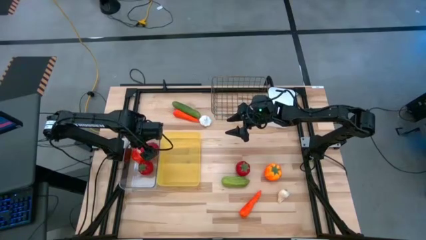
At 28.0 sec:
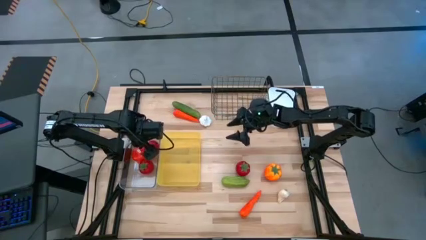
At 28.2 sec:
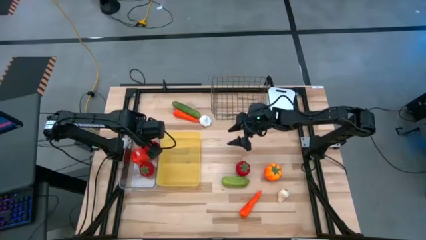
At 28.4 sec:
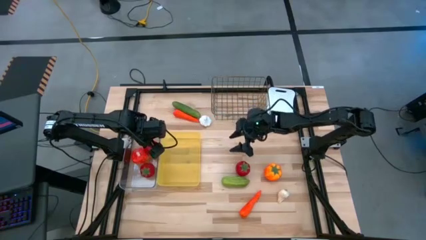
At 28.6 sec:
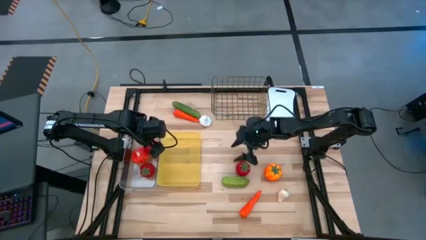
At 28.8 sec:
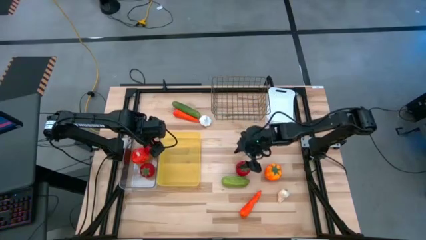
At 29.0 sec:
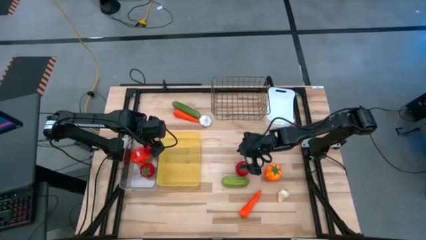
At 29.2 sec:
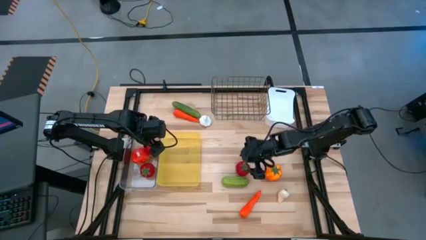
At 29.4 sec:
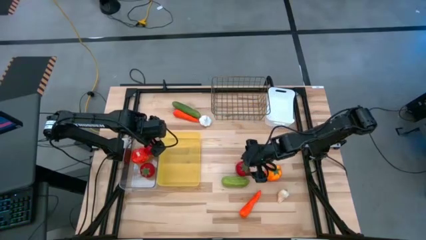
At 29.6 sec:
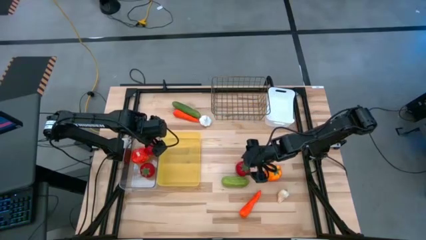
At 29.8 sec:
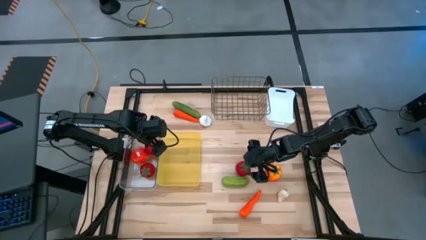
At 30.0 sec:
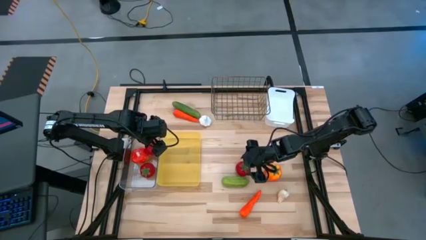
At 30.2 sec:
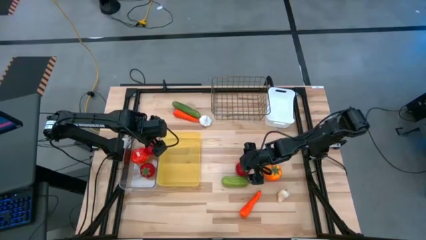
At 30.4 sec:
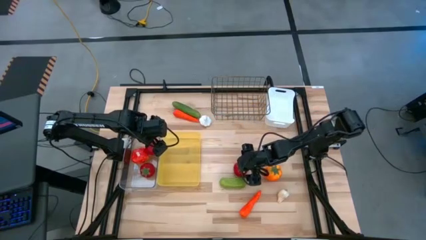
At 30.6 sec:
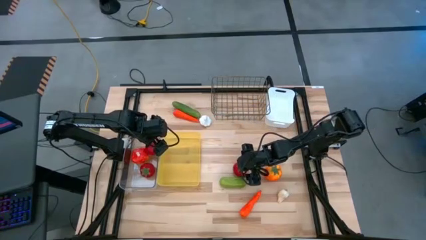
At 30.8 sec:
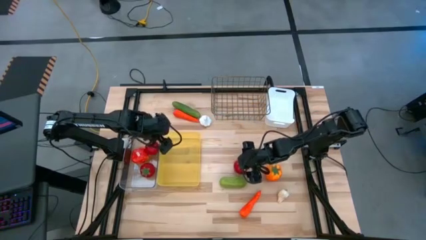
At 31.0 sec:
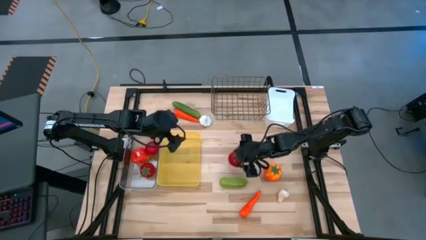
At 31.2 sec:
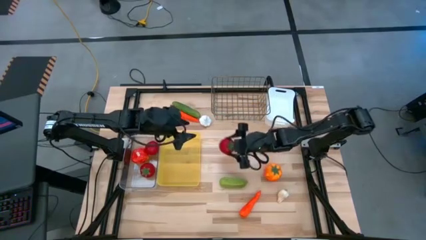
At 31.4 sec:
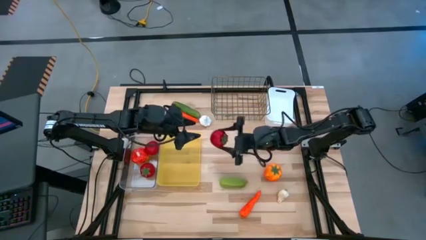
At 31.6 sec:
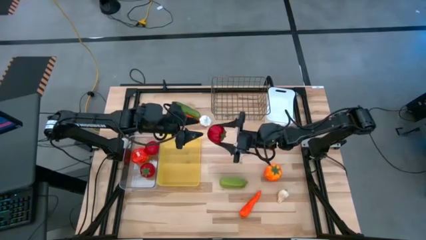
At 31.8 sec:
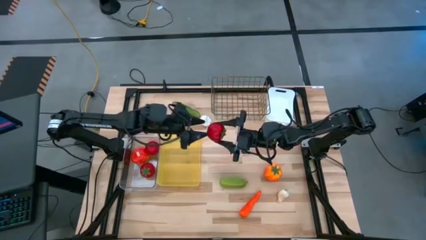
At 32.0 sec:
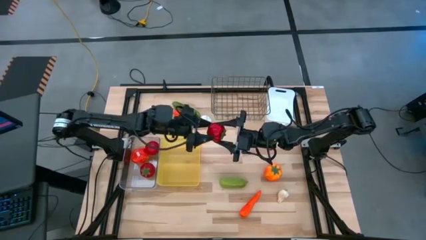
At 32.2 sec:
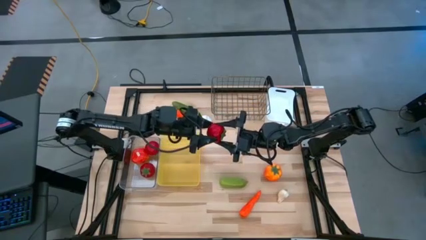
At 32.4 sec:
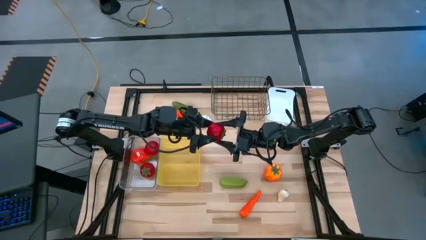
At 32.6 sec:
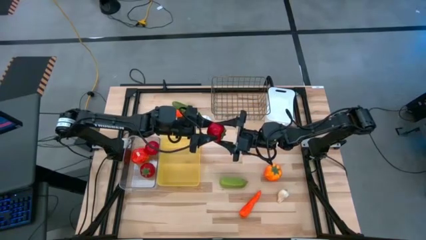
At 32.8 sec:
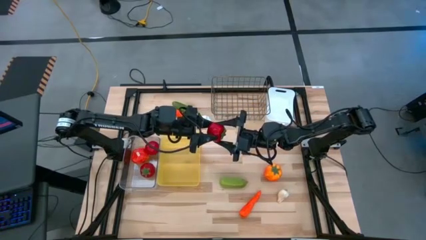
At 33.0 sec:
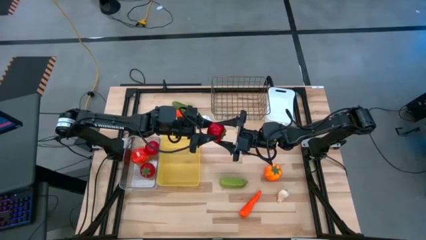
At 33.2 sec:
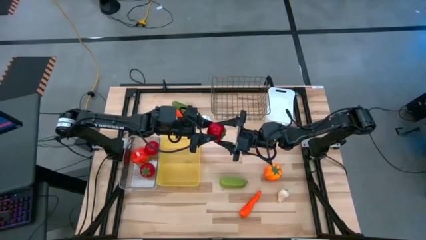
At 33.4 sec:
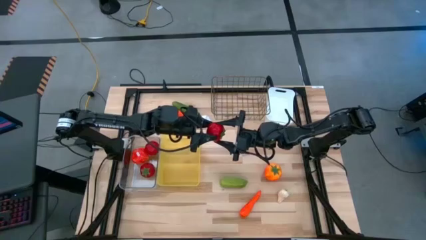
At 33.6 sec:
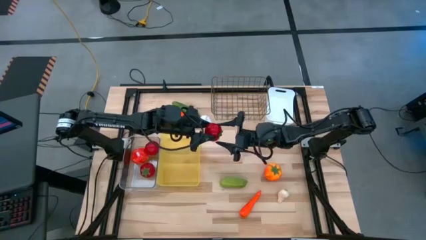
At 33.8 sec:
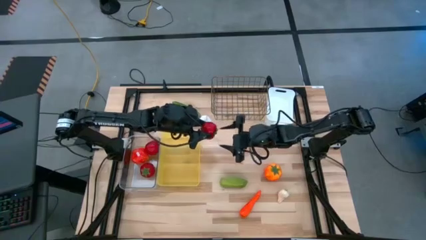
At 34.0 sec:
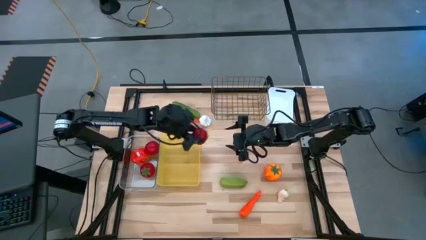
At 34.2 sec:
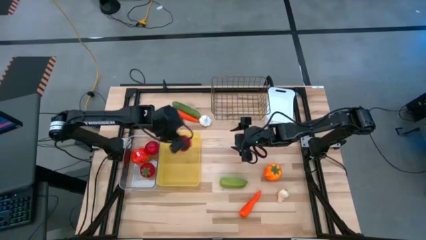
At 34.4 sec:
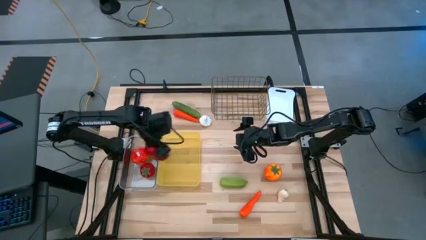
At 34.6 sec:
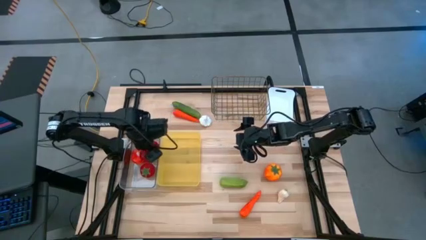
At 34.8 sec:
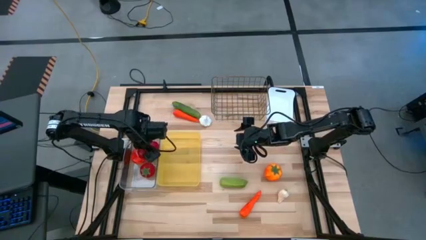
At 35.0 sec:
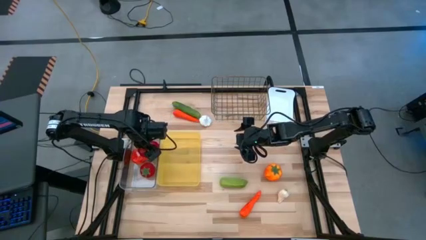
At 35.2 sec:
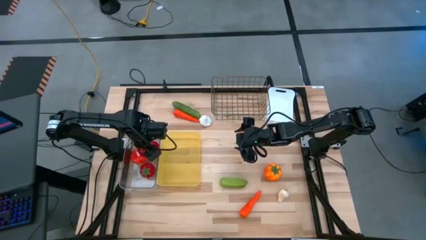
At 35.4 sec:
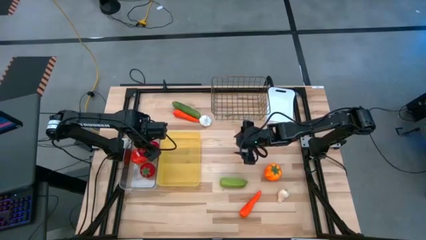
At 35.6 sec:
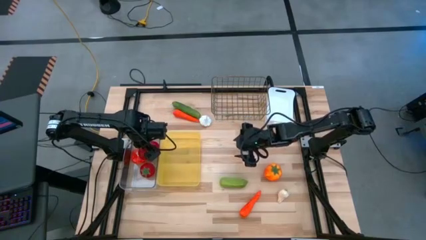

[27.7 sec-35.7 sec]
Task: Sort produce into baskets
Put the red tomato into the transparent bin

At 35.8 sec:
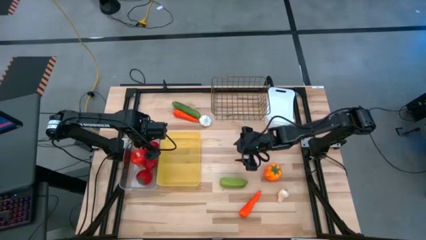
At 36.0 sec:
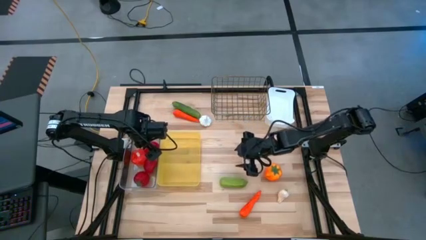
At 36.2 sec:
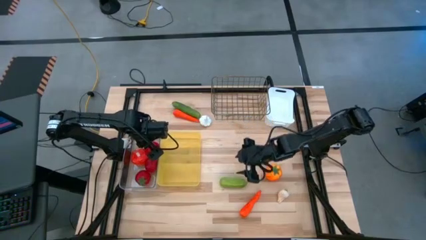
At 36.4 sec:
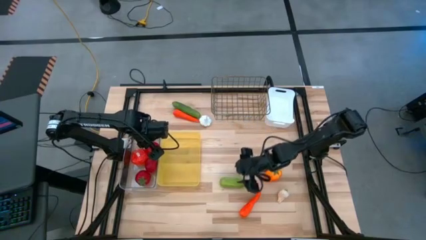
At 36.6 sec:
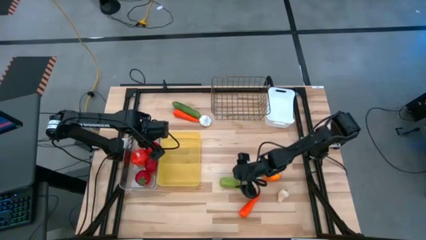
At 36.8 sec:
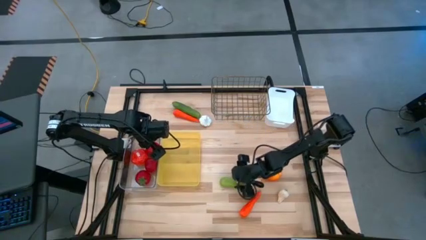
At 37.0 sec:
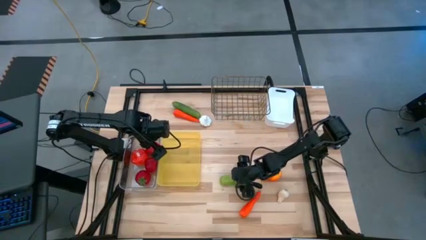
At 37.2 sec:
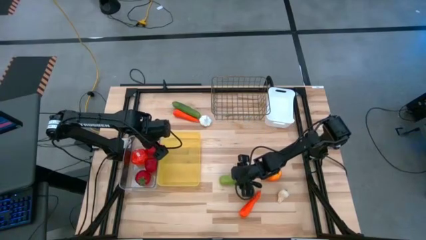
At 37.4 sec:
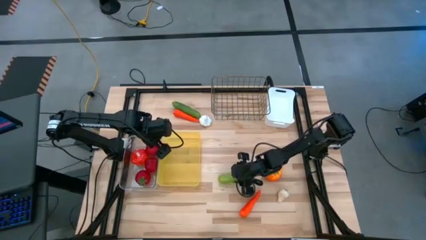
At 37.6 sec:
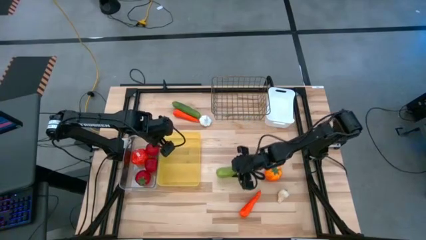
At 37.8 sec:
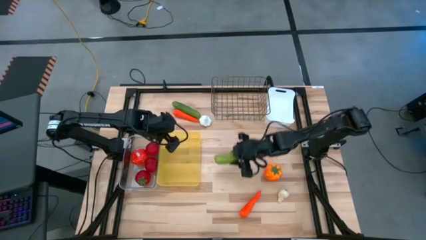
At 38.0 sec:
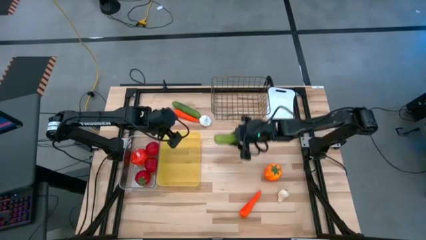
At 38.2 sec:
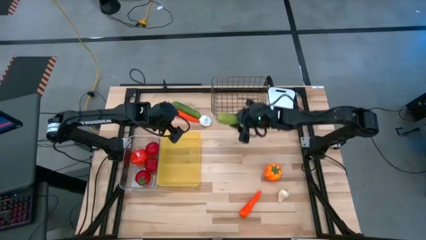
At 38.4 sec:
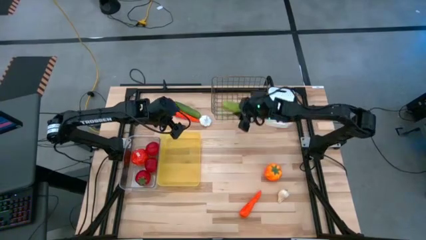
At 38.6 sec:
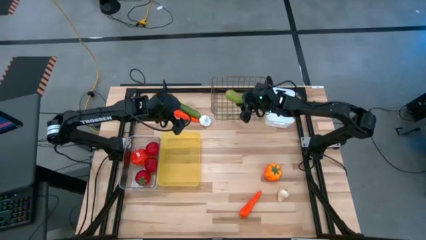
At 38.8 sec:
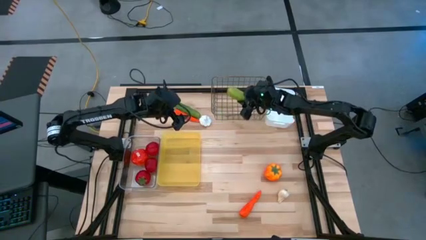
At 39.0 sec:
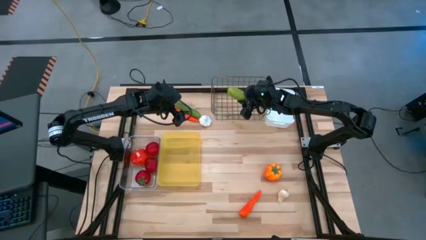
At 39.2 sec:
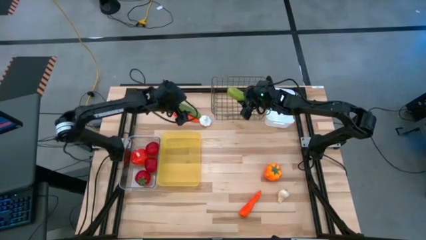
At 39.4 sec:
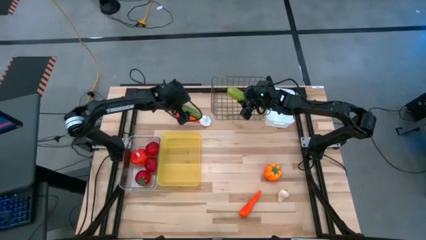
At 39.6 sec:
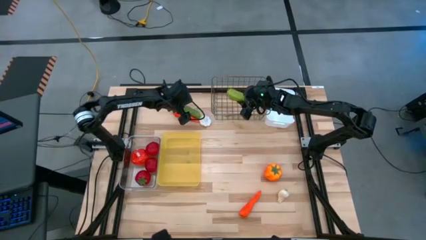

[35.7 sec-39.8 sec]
Put the bottom cucumber into the wire basket

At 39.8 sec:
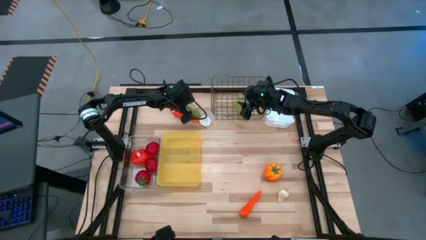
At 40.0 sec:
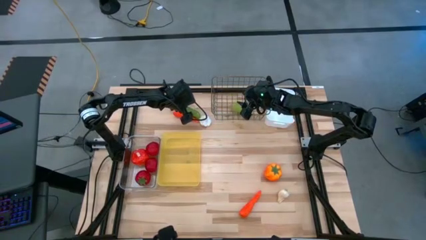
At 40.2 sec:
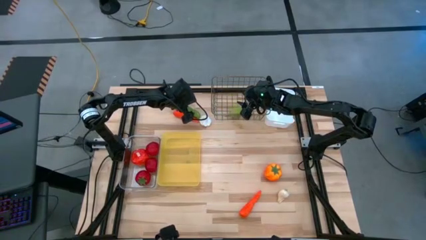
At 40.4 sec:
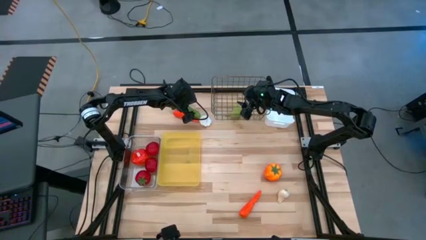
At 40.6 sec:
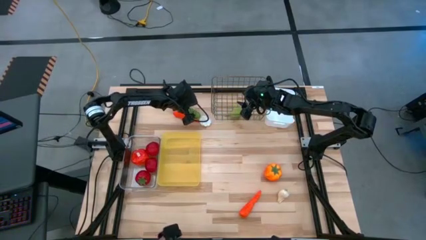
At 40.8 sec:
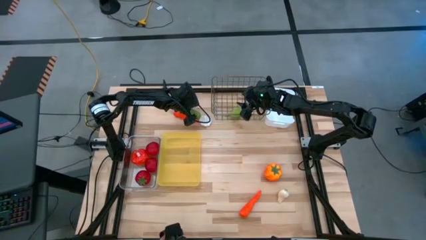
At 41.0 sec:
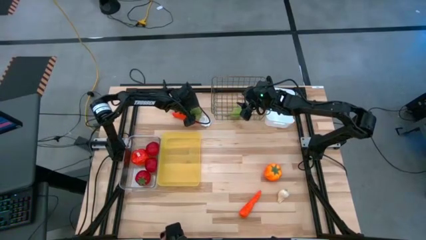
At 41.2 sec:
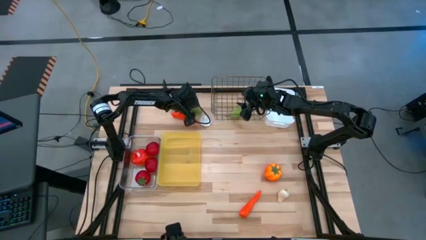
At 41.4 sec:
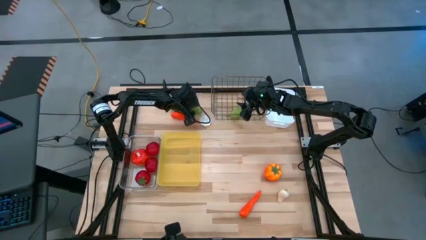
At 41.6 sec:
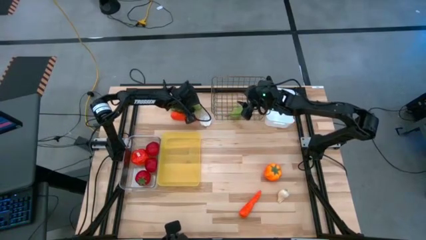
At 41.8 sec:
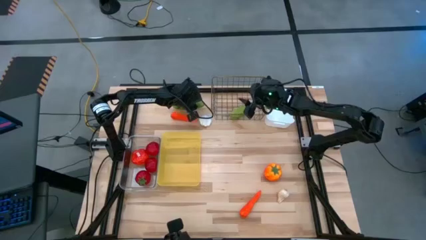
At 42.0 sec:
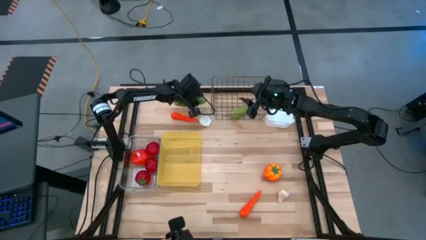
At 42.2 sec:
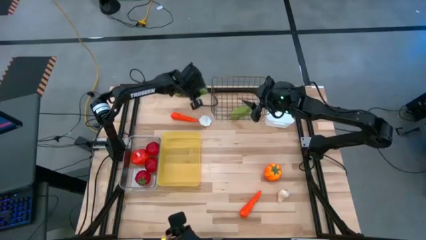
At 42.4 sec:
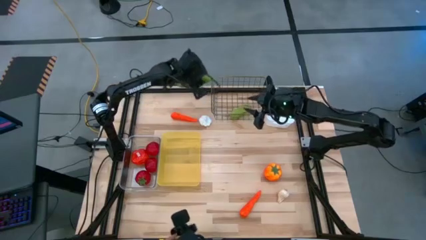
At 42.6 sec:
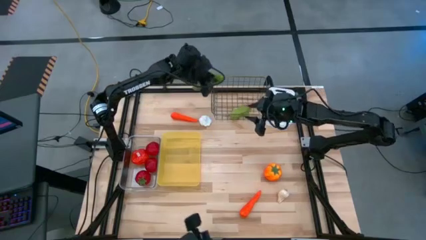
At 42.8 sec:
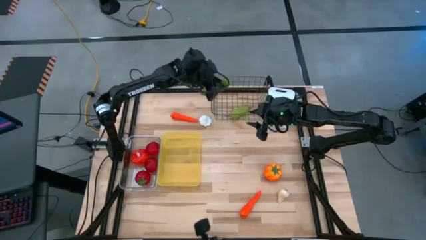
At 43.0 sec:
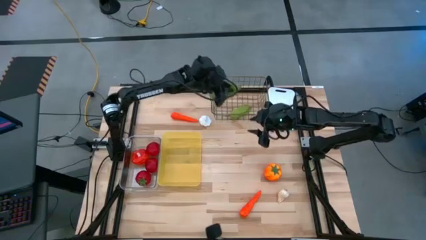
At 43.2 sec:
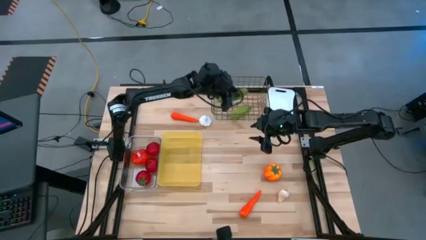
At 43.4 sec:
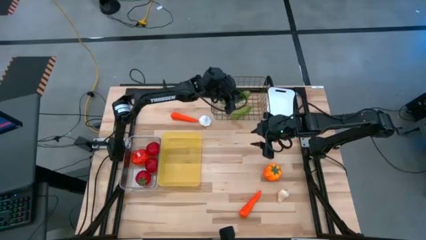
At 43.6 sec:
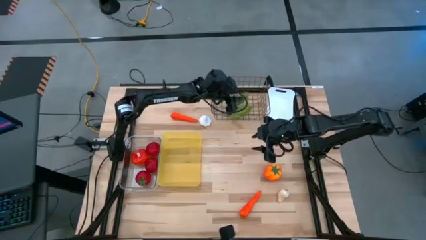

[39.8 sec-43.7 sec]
Put the cucumber into the wire basket
